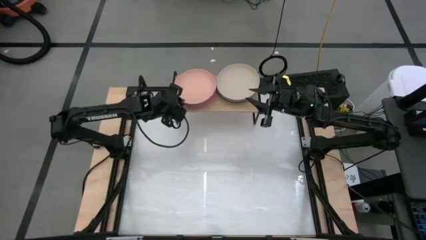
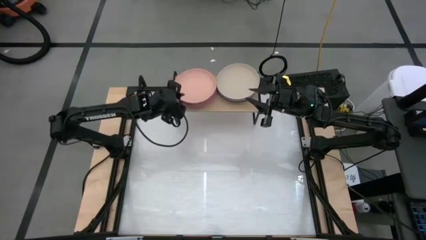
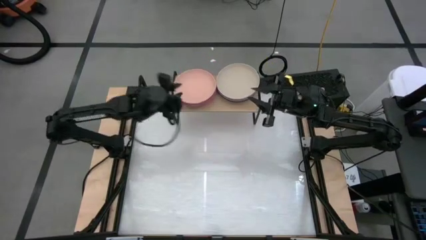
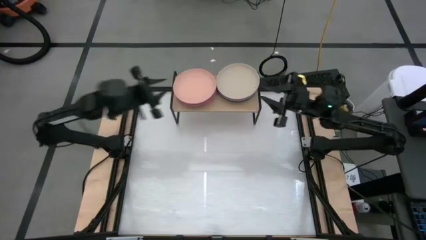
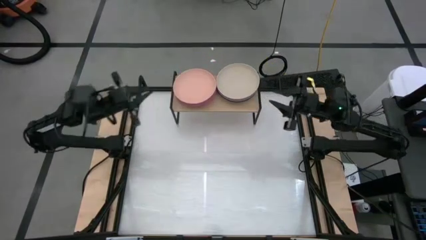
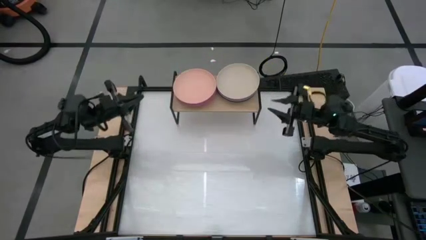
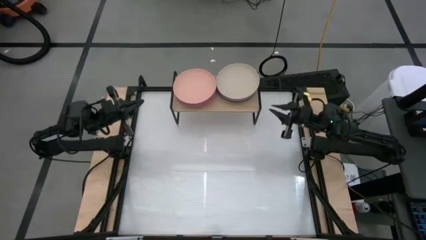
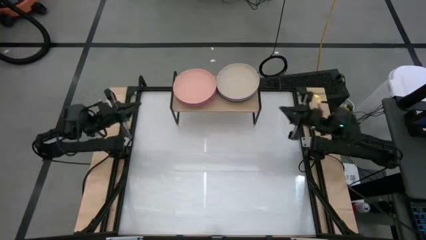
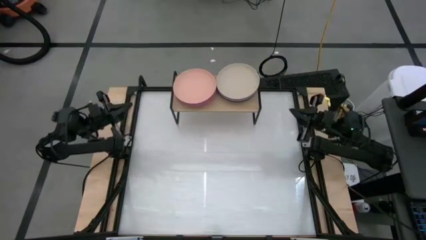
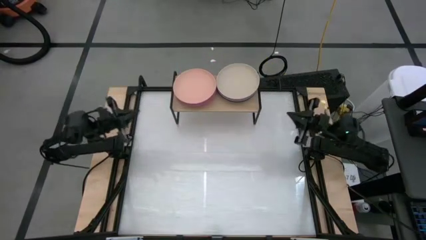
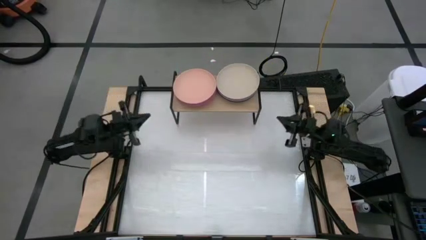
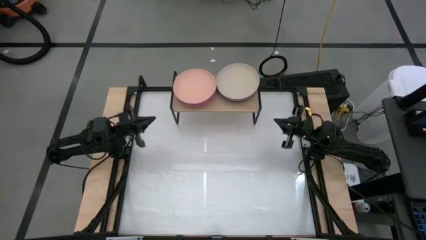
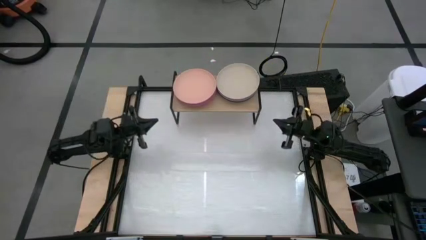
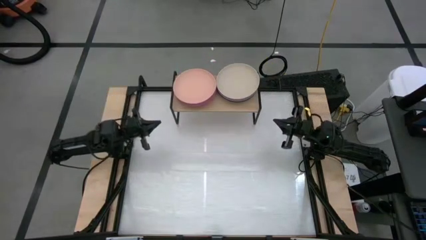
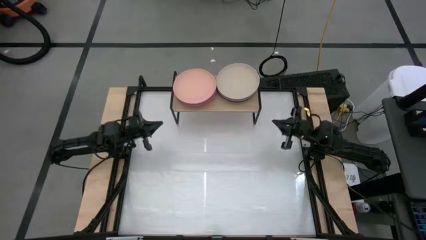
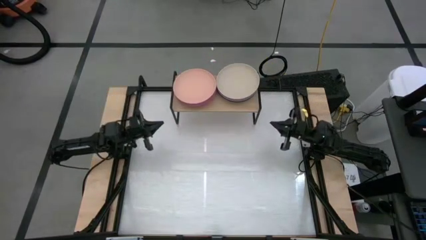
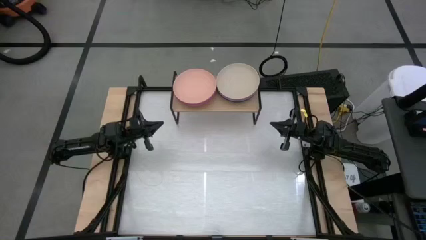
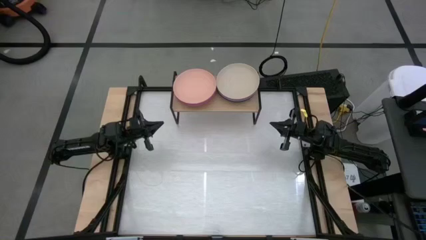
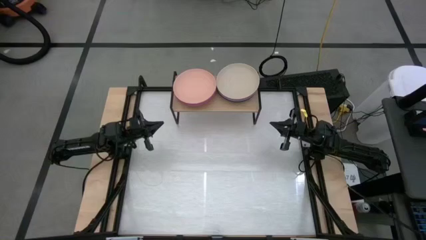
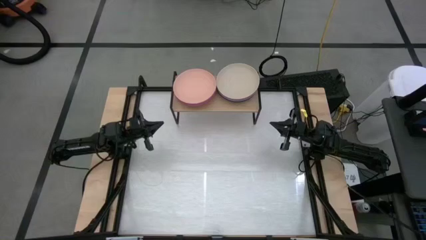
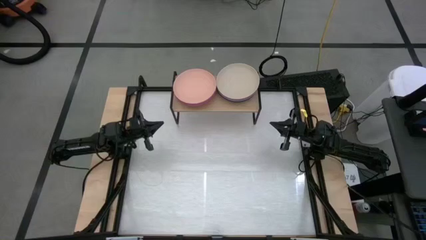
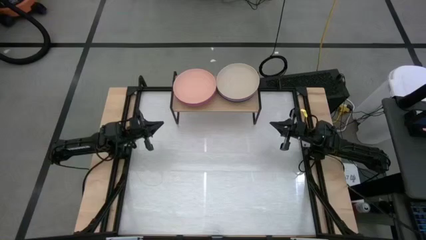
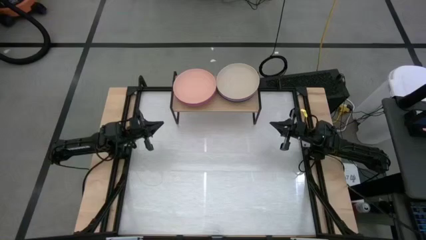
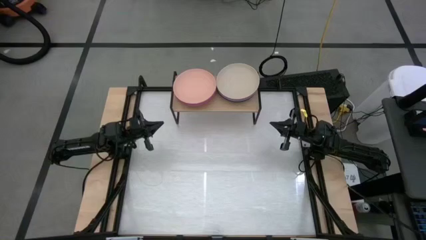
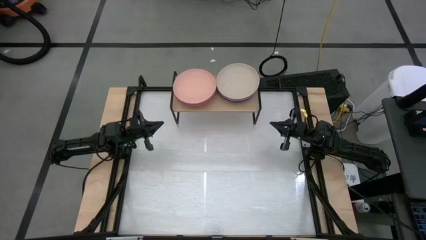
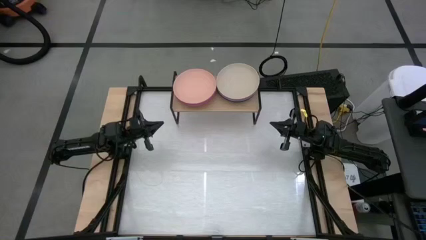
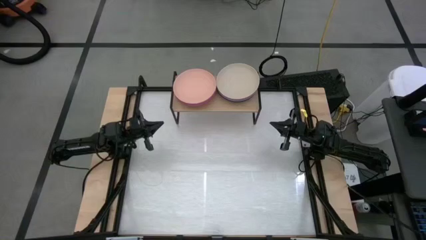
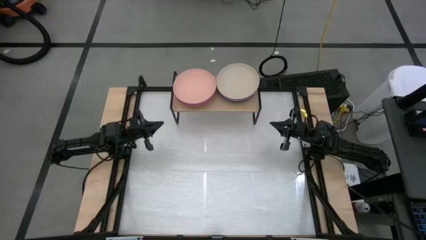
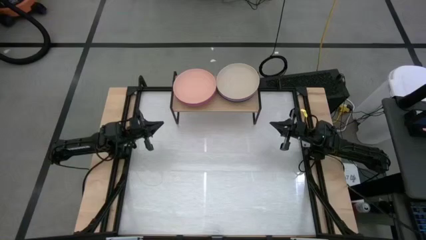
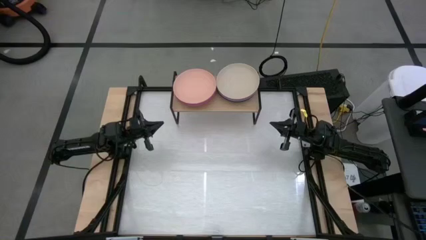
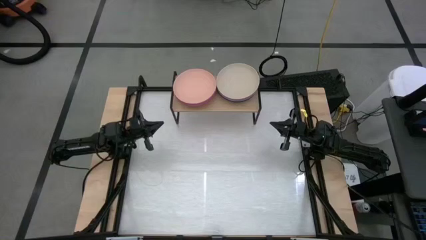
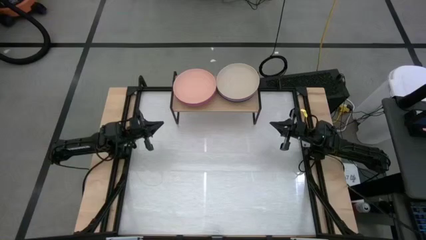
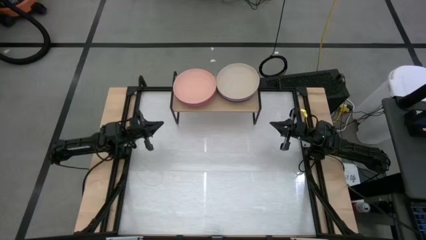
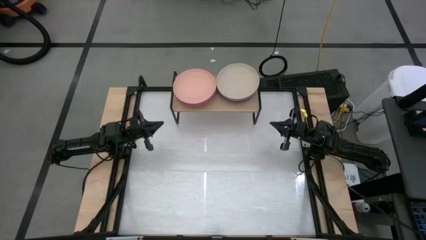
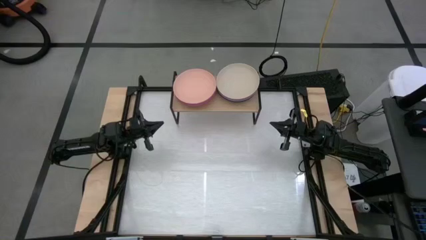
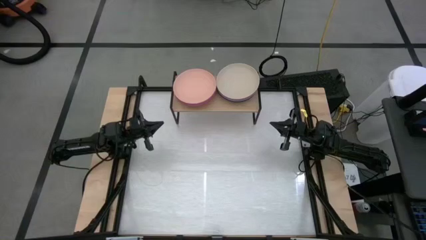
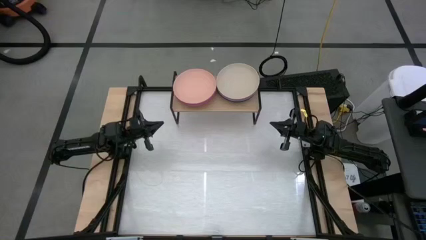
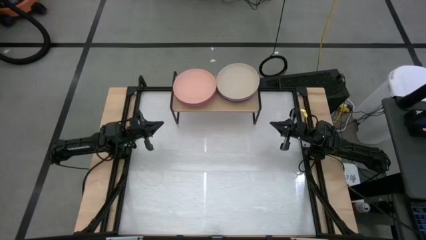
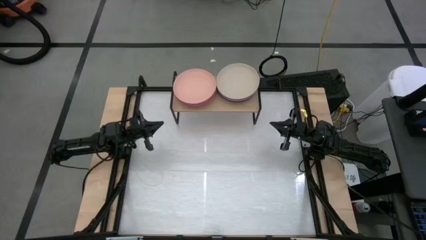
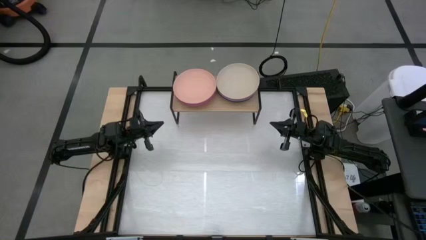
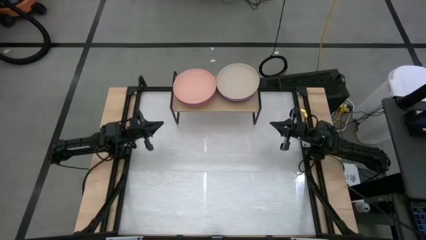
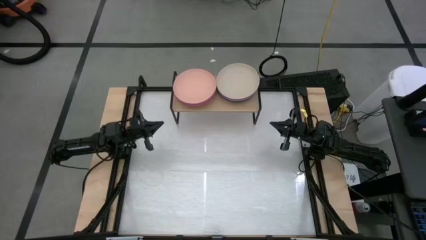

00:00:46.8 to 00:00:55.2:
Task: Place and stack plates onto a shelf
Return to Home Position

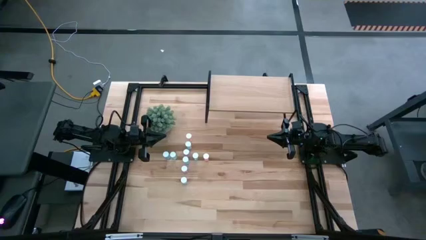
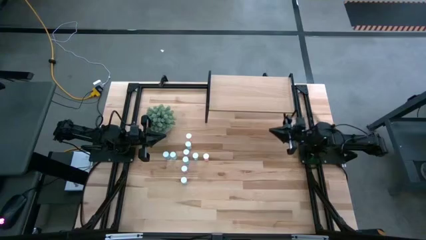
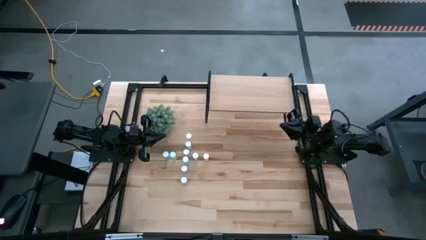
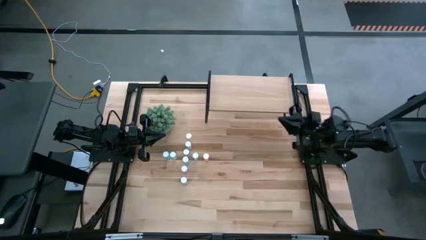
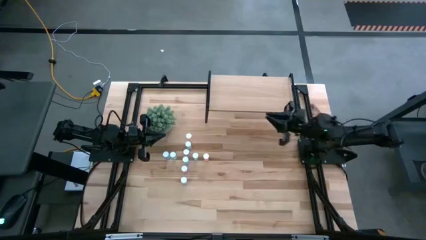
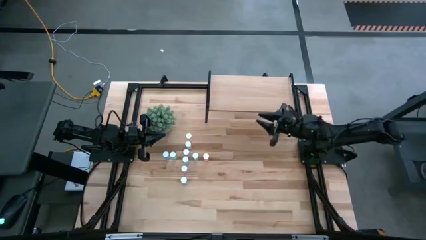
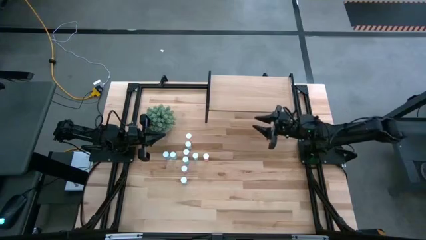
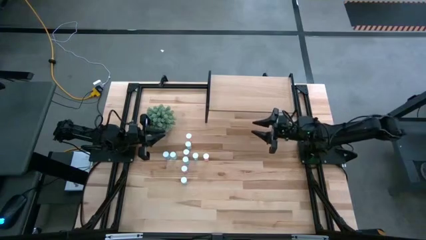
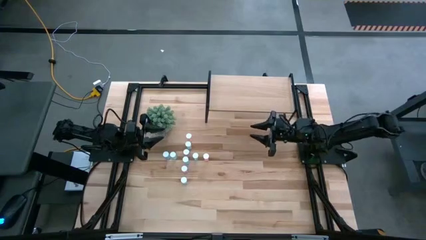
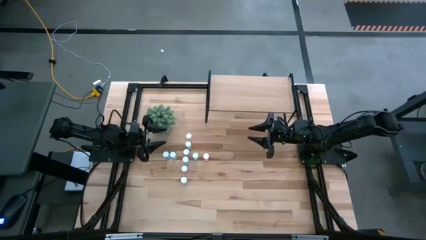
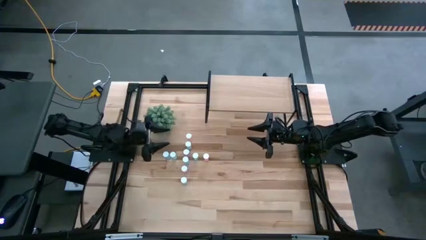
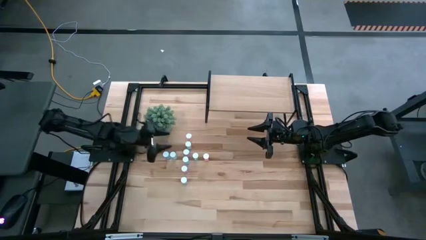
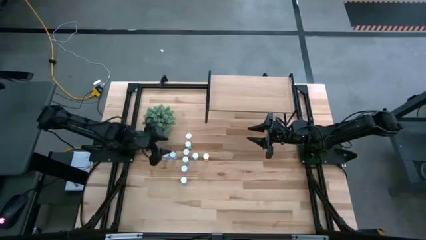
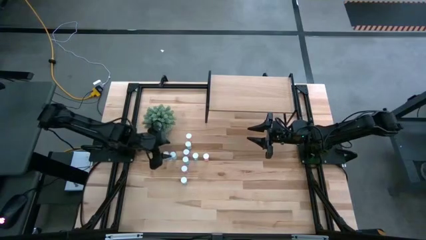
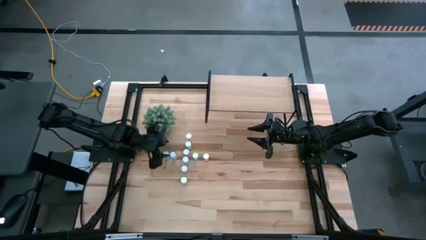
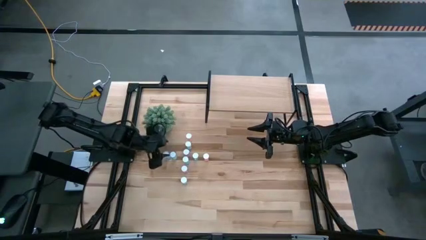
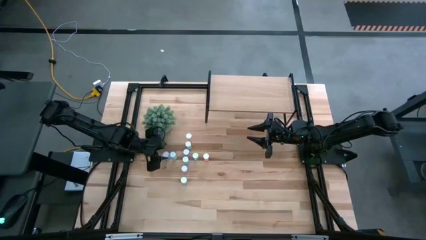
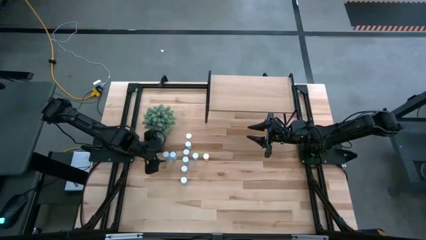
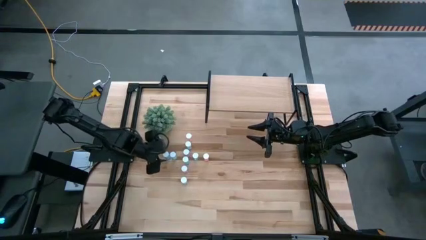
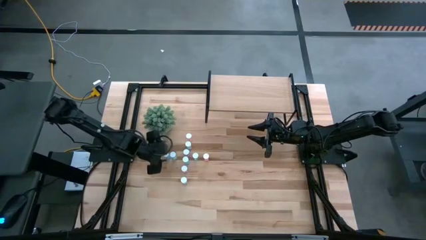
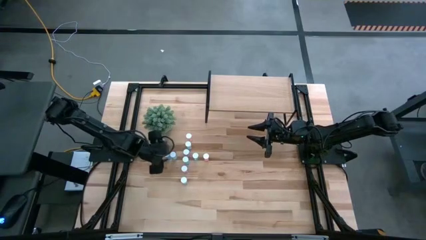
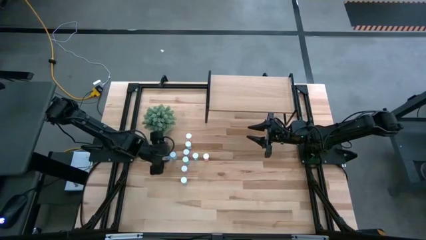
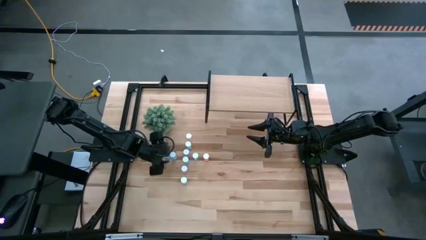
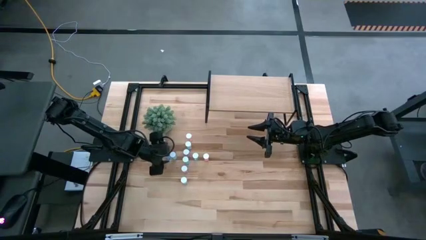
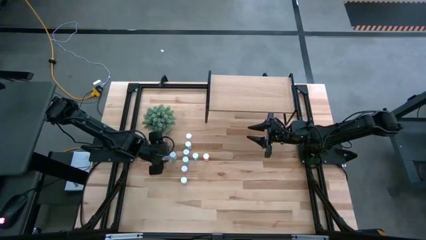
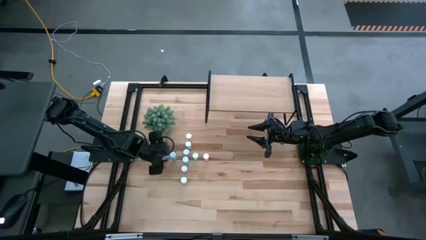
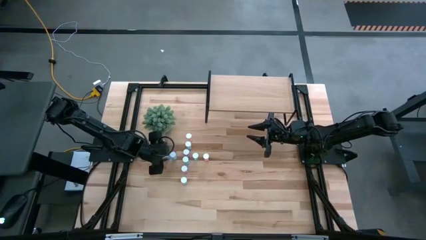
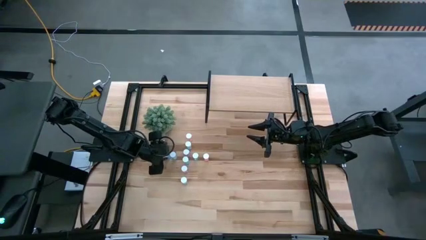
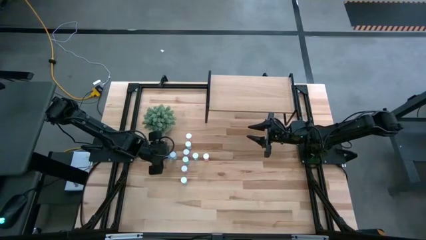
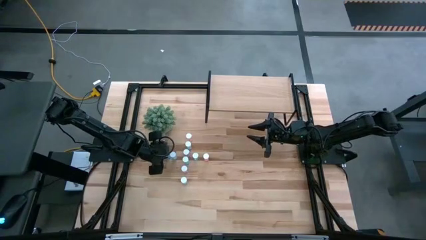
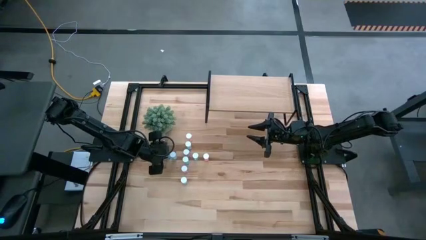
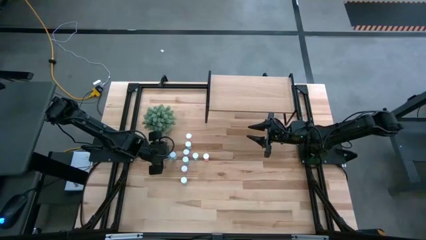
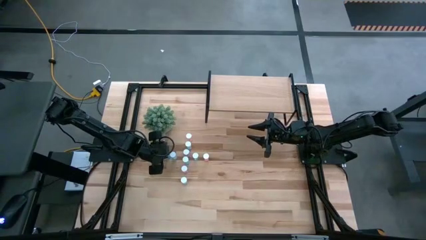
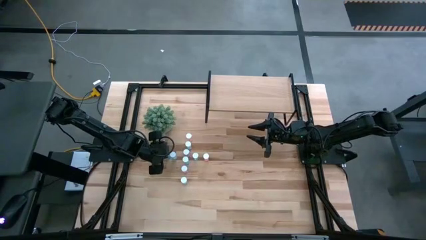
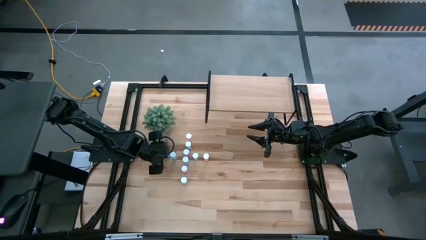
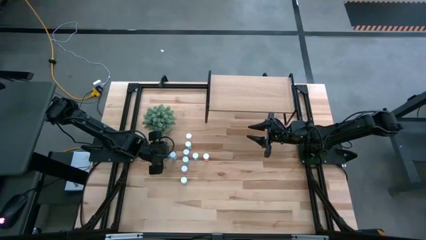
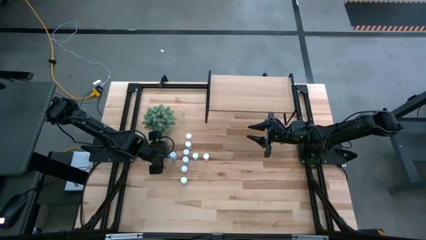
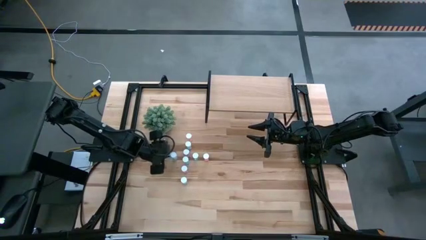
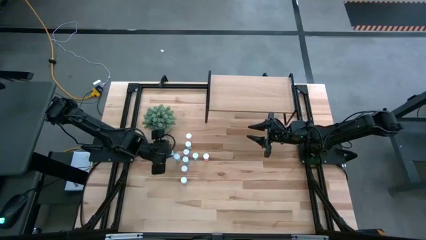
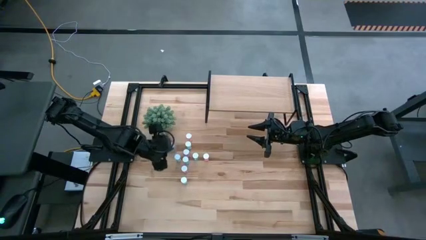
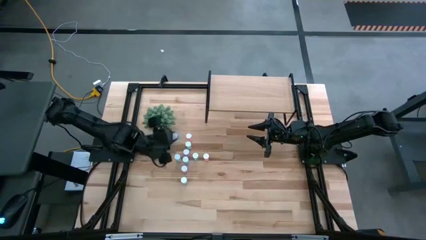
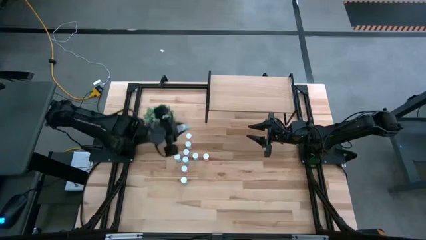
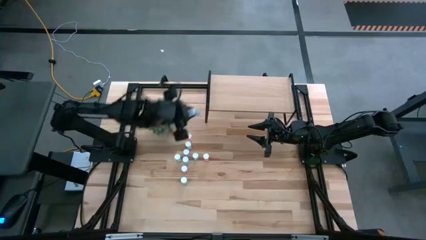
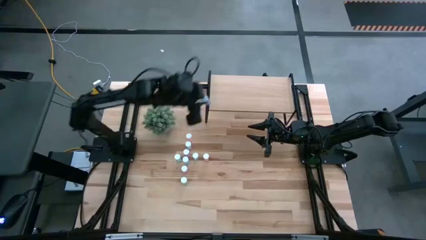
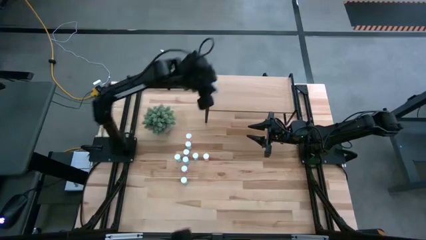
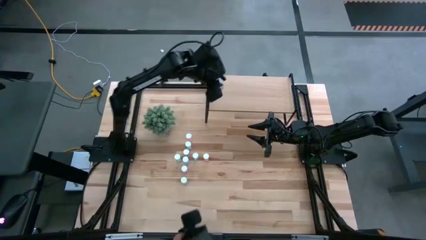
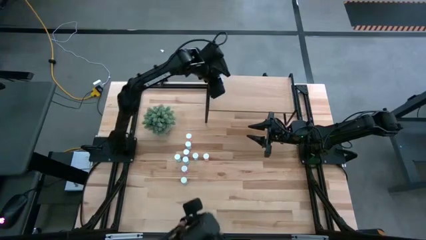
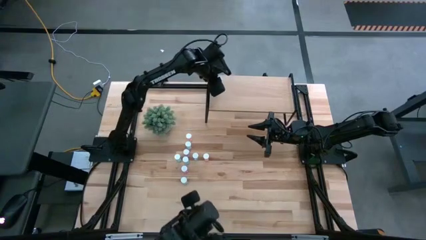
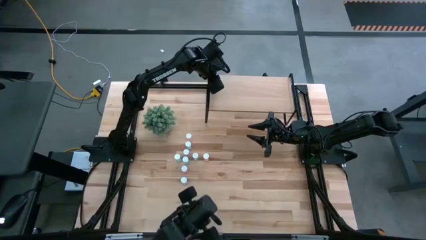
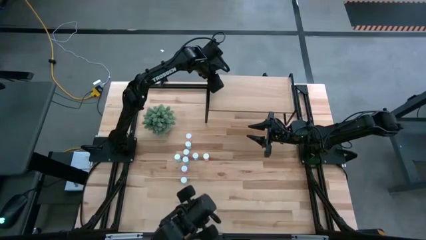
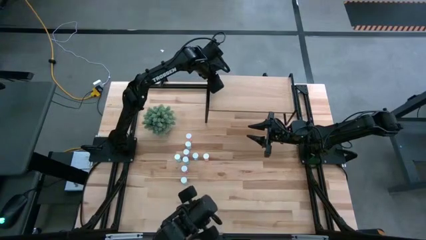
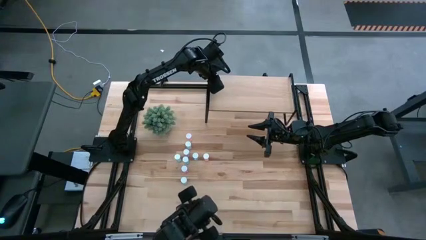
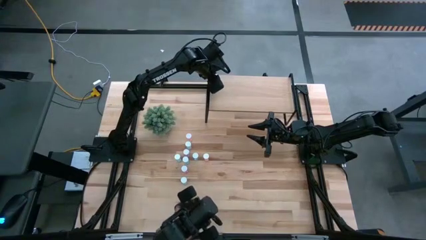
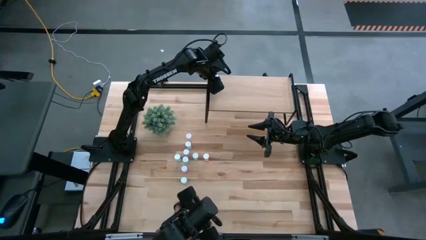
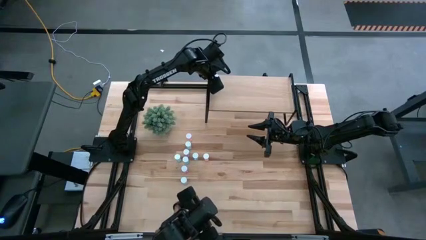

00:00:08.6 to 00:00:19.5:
Task: Pick and place medicine bottles onto shelf by color
Put the transparent blue medicine bottle on the shelf
